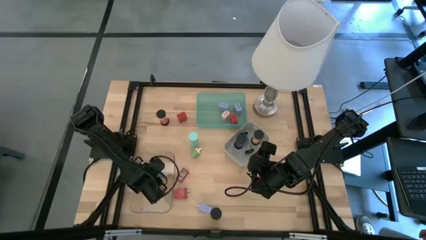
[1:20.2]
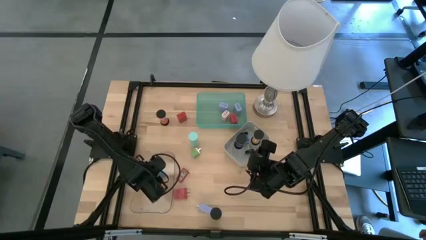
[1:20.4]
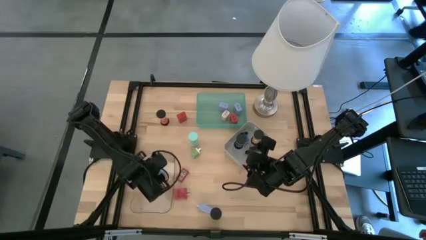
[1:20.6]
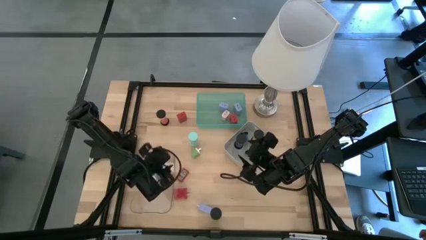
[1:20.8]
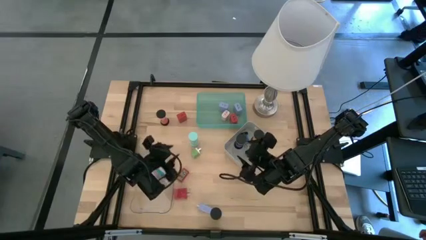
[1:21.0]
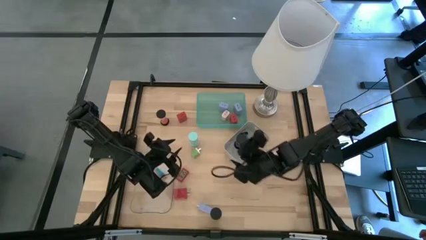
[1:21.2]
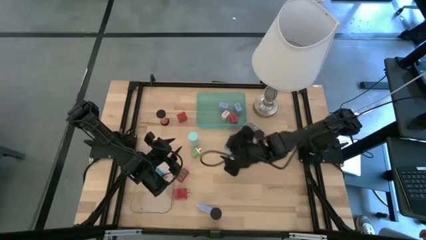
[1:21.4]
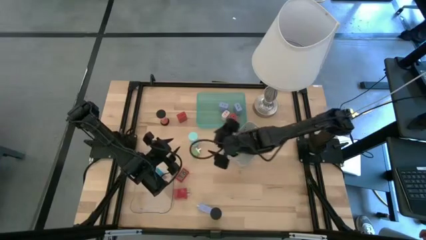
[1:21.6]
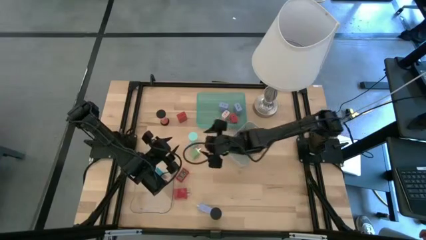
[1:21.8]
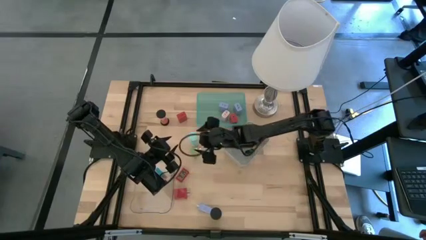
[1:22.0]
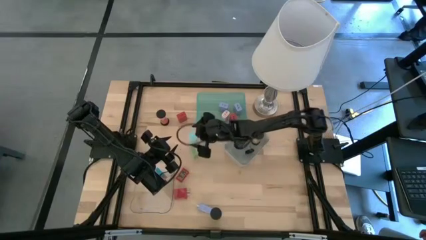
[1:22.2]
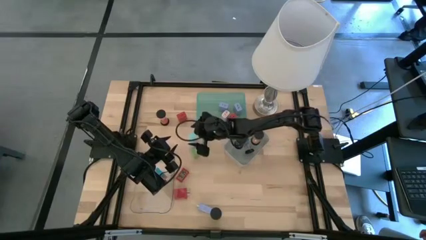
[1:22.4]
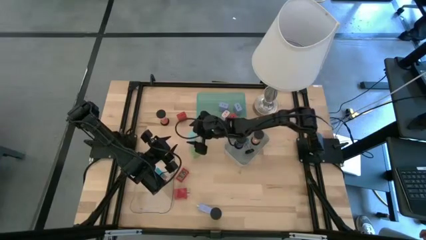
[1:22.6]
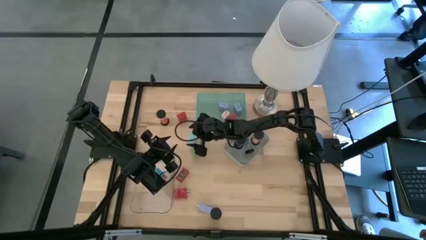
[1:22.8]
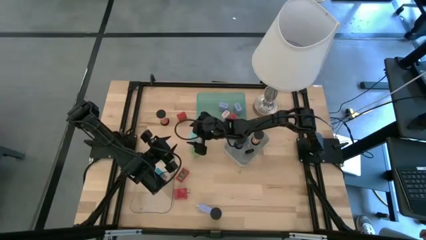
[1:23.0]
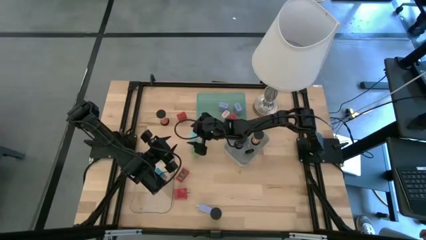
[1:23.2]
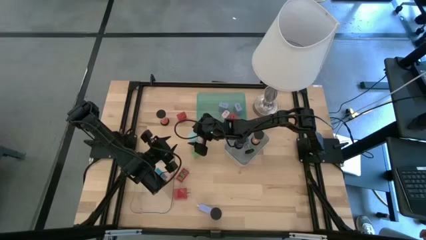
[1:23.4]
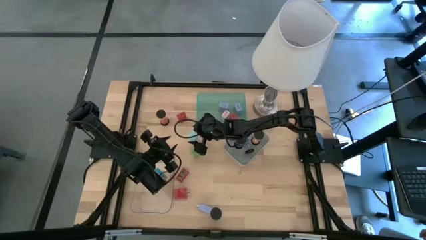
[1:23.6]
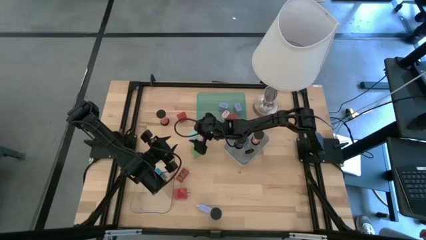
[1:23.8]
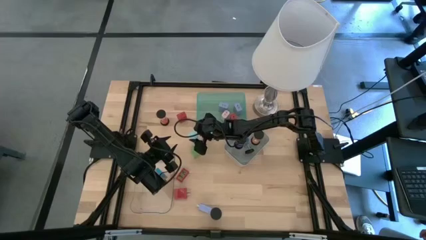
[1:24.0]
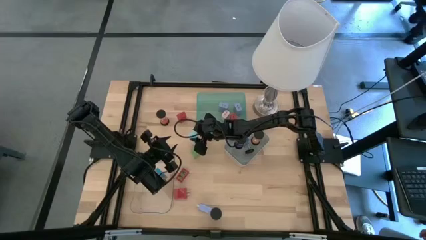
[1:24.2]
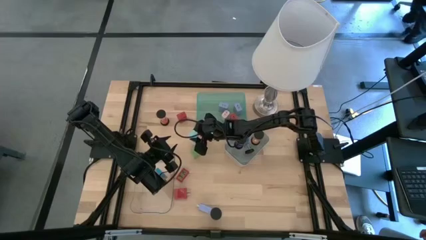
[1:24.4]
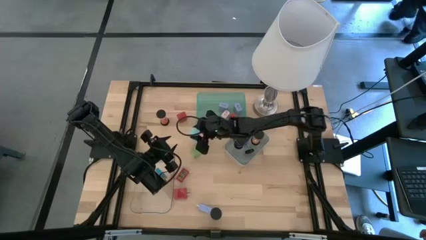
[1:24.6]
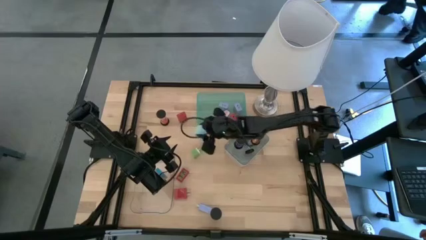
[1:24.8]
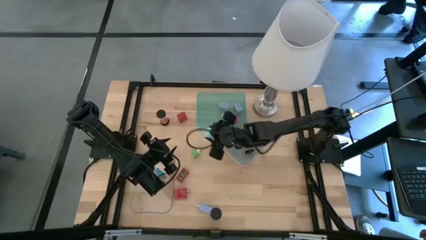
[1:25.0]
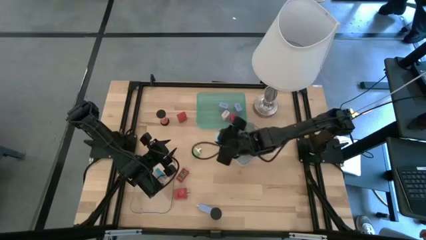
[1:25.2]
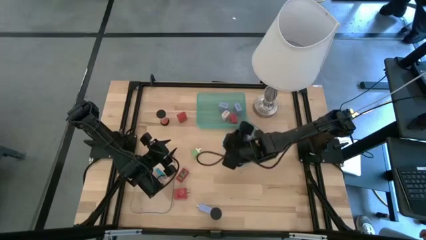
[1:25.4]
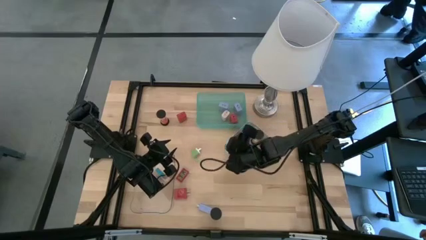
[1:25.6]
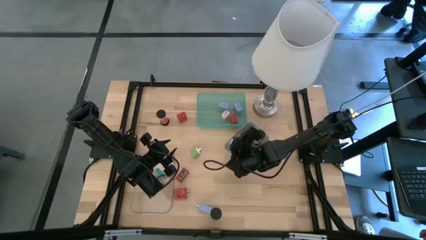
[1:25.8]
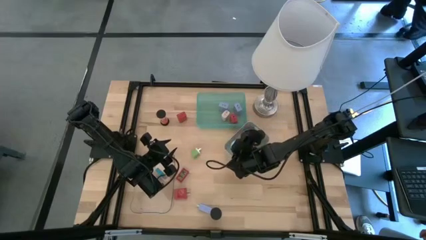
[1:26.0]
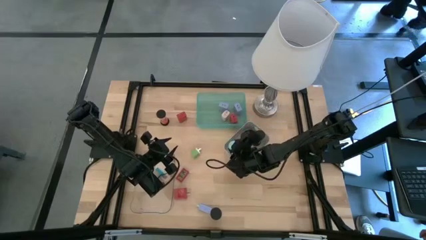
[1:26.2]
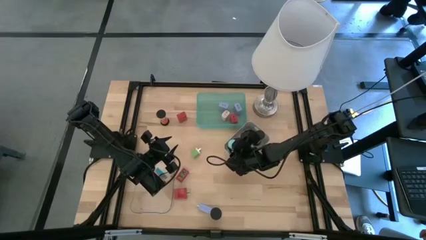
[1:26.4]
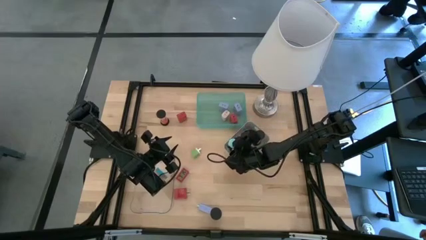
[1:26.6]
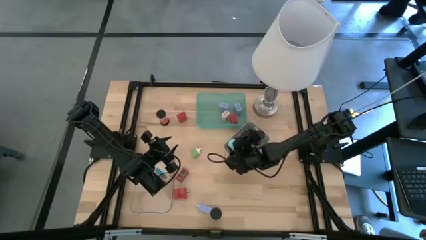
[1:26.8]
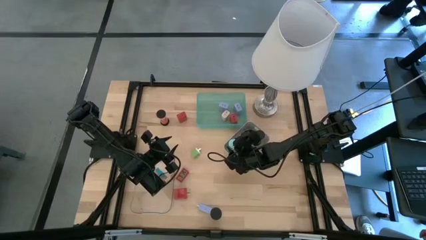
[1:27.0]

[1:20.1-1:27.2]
Task: Pick & Place Office items
Put the light blue hourglass into the gray bin

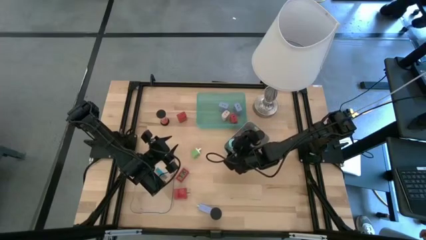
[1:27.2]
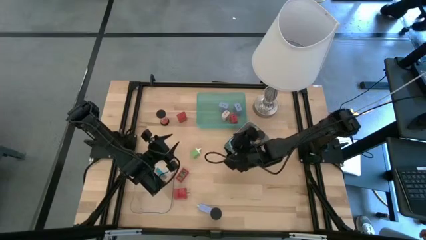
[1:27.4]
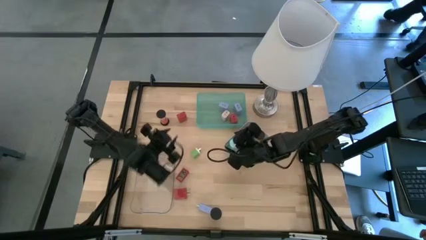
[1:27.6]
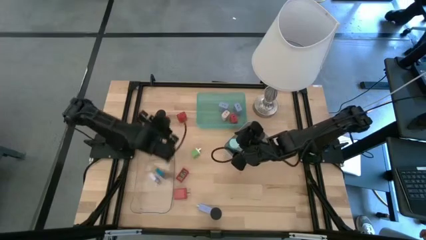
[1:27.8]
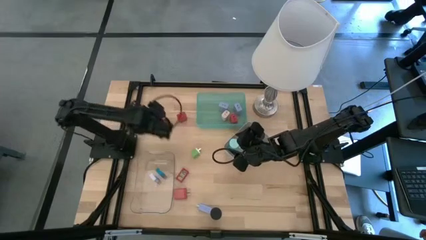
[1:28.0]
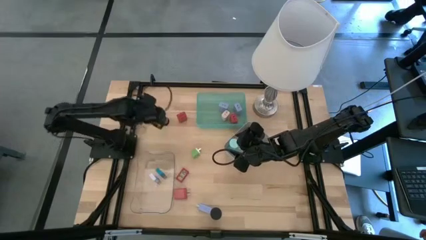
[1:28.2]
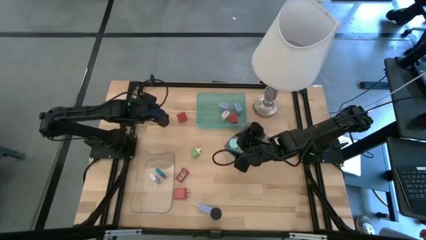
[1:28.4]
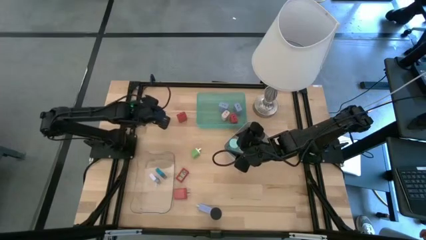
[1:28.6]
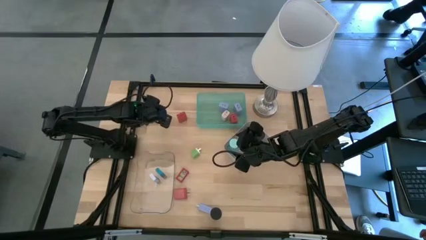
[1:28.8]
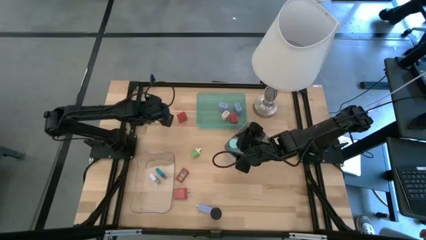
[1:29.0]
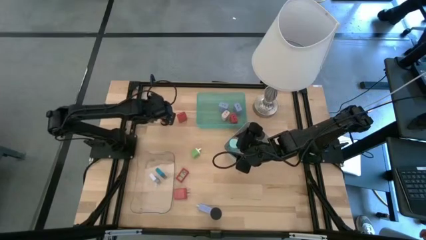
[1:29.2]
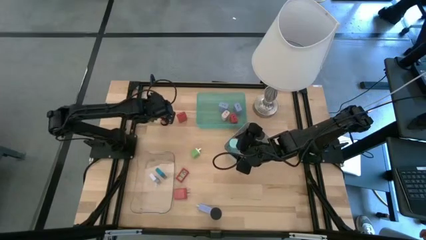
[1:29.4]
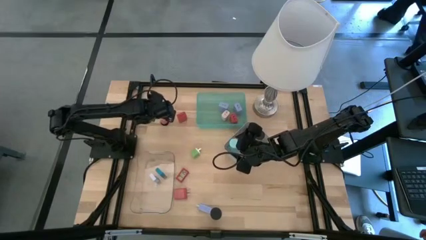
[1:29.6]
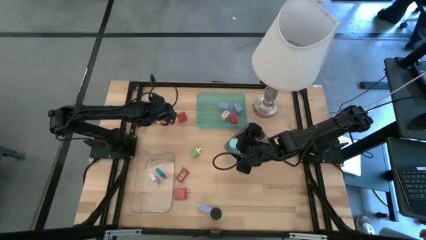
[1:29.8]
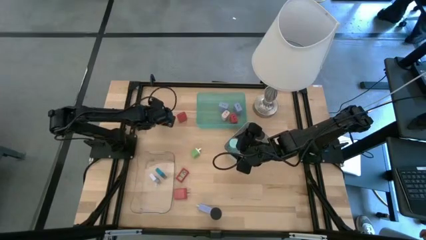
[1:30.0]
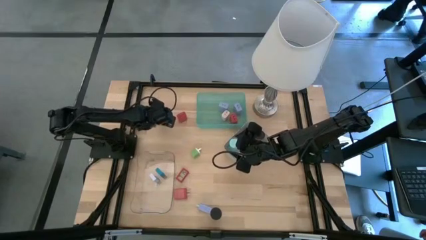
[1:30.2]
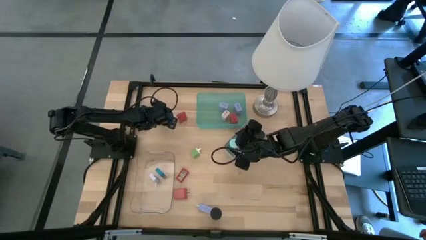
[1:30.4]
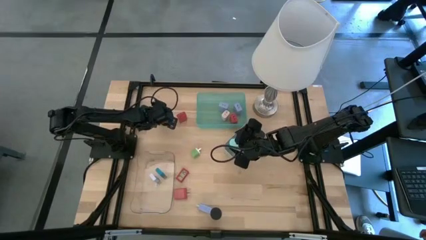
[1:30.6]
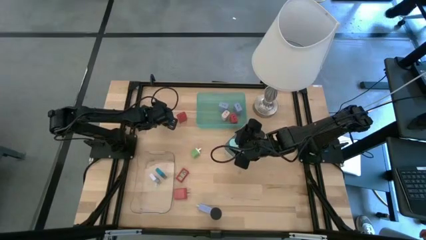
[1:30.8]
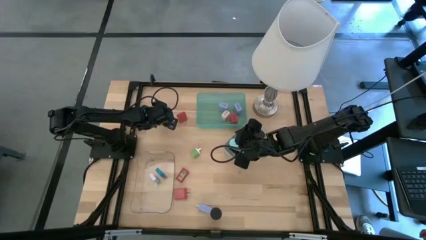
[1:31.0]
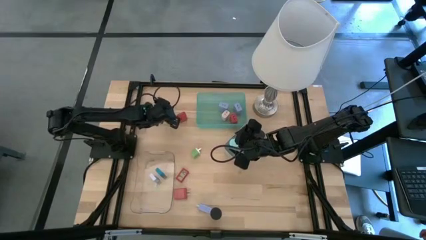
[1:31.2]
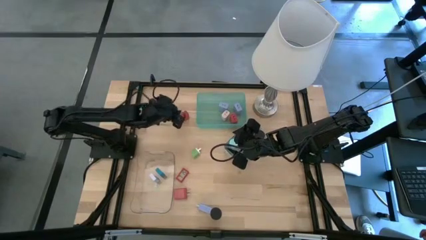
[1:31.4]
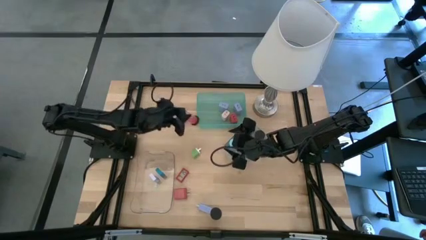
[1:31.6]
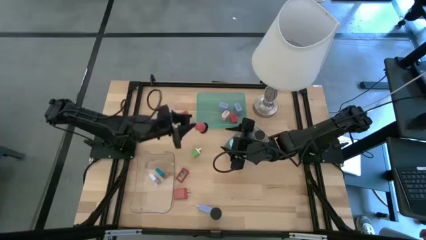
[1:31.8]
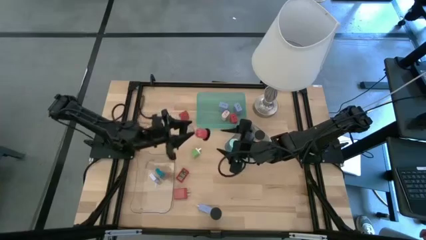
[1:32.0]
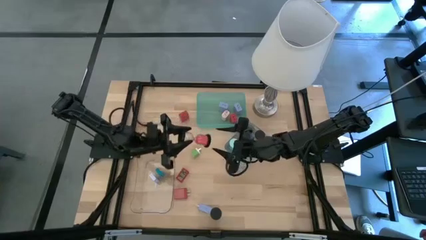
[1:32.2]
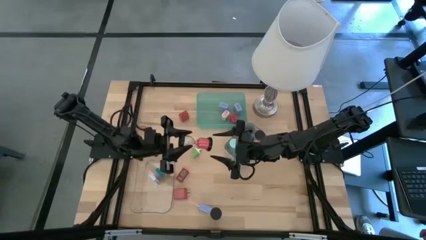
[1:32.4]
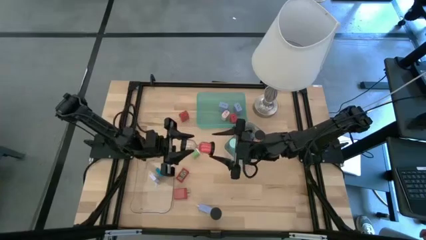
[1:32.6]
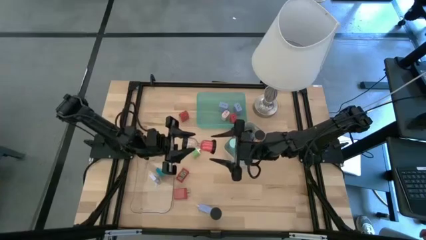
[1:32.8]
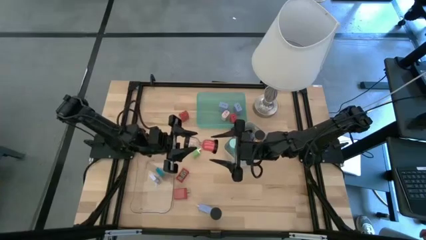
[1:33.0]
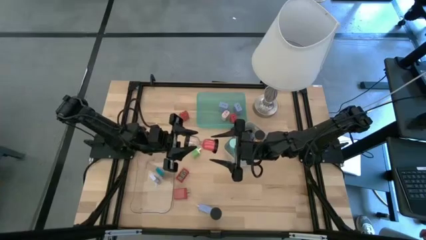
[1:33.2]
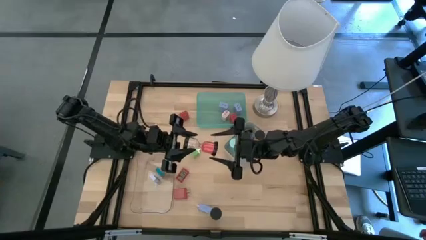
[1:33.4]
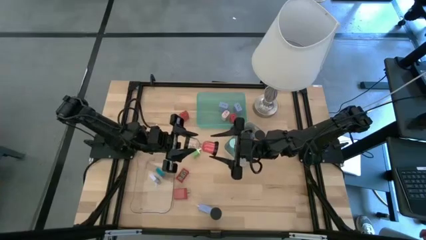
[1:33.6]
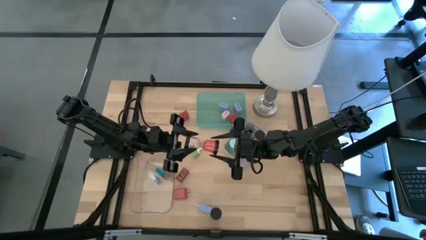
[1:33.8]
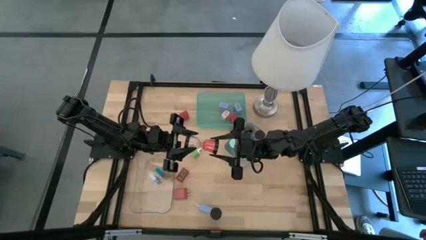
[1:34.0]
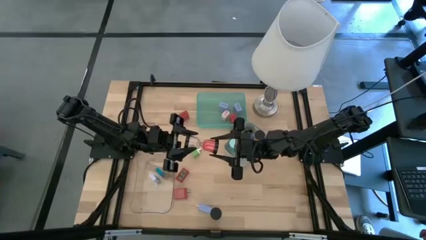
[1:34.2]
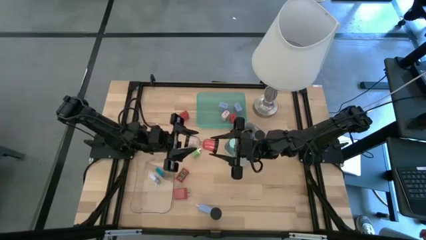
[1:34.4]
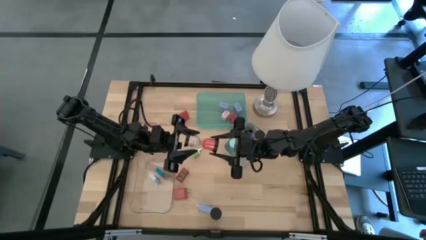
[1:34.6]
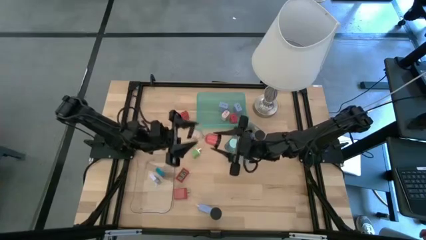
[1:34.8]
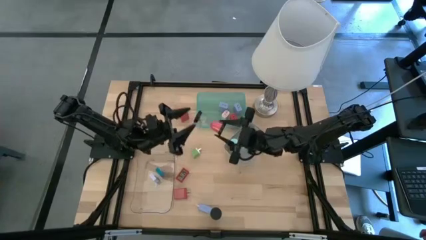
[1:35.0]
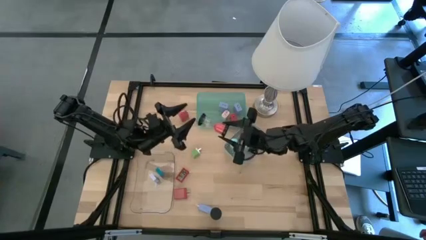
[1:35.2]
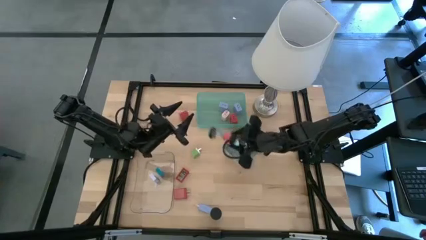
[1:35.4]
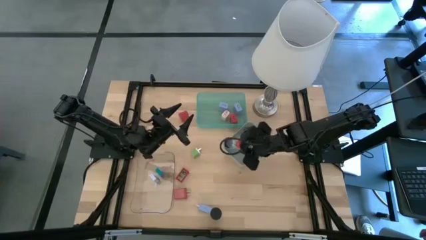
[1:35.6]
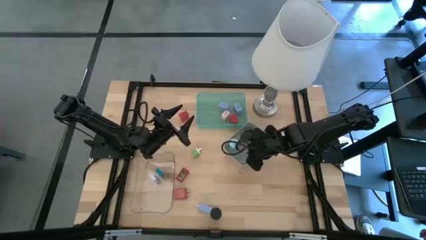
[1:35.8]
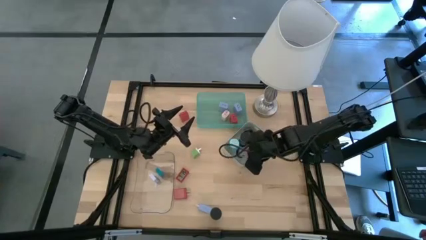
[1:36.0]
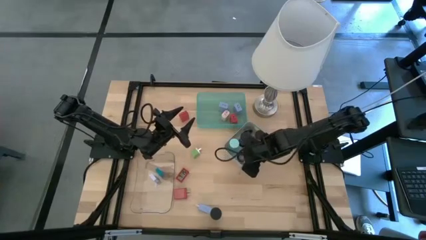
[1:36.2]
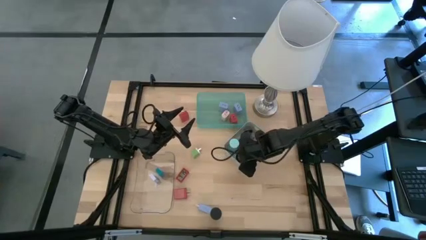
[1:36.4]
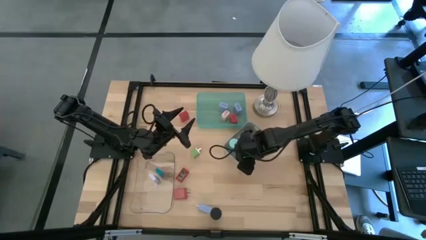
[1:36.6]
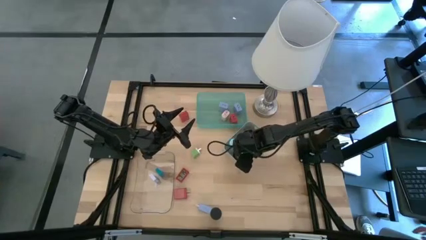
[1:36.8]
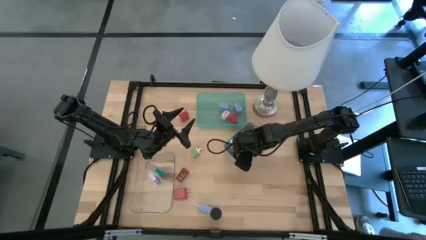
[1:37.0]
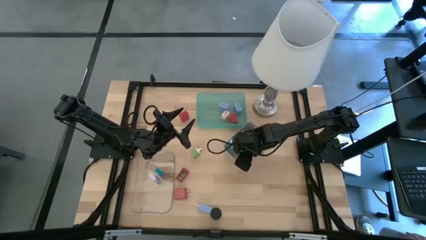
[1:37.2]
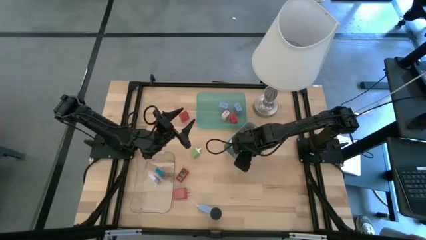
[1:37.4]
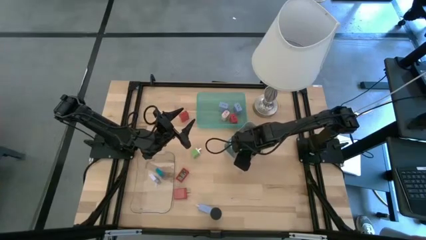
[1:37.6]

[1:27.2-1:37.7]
Put the red hourglass into the gray bin
